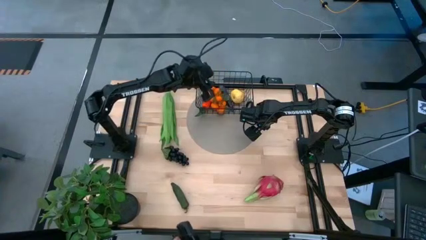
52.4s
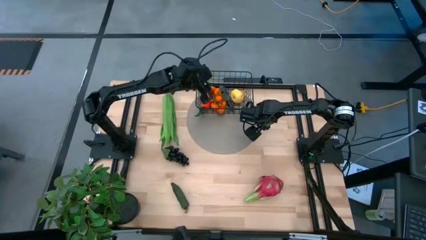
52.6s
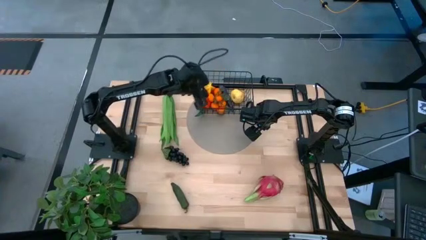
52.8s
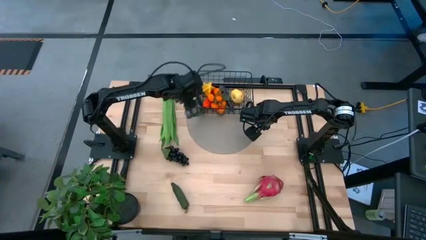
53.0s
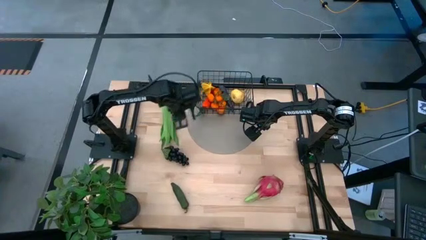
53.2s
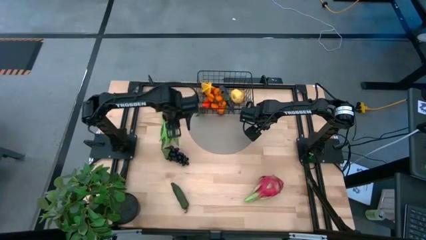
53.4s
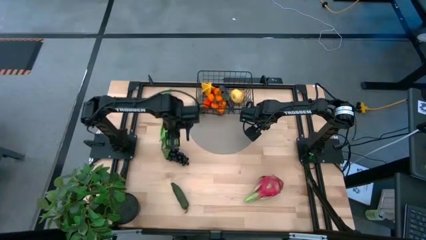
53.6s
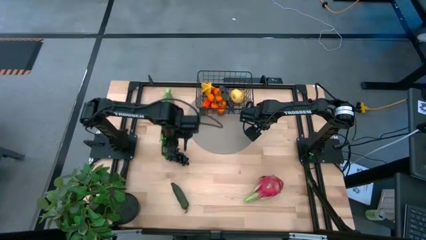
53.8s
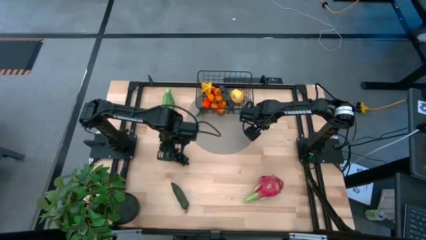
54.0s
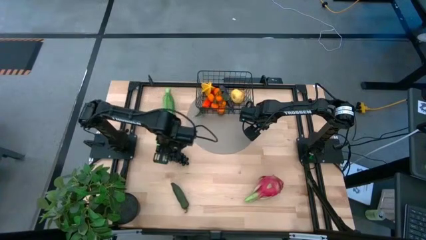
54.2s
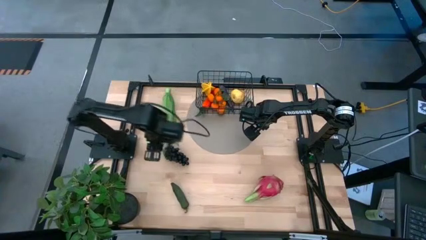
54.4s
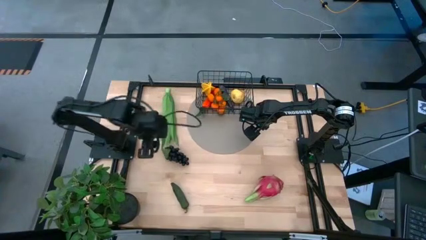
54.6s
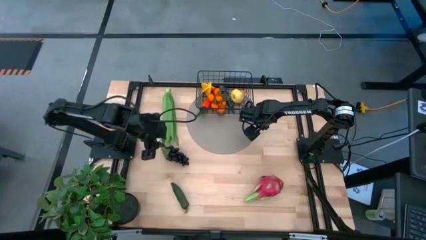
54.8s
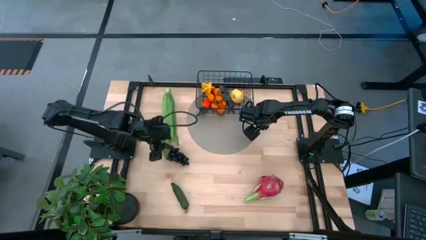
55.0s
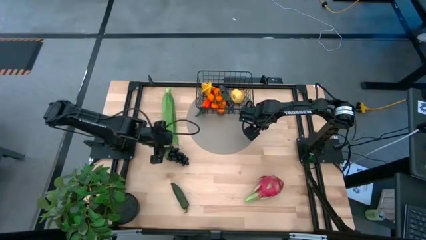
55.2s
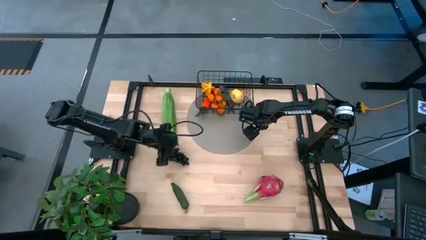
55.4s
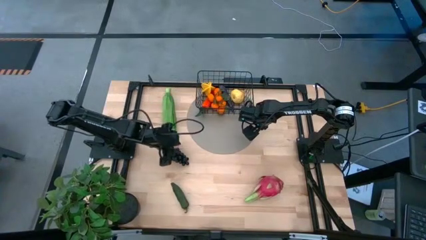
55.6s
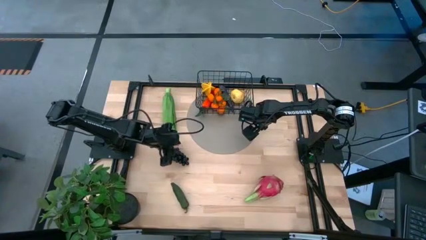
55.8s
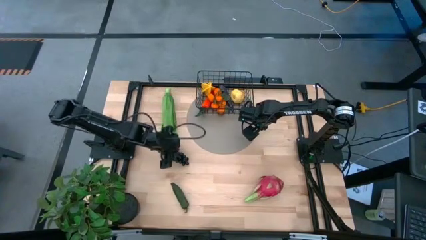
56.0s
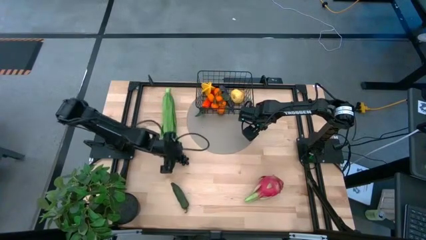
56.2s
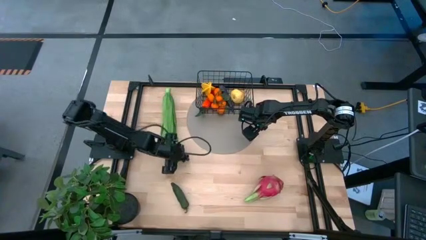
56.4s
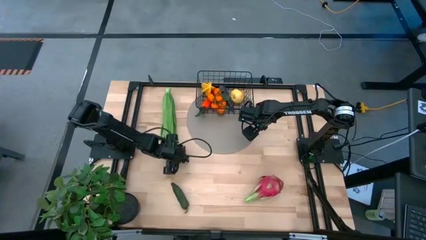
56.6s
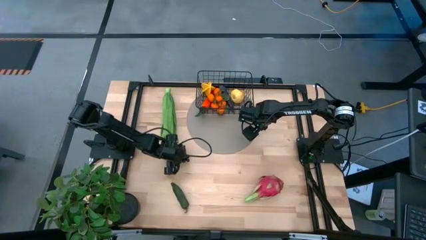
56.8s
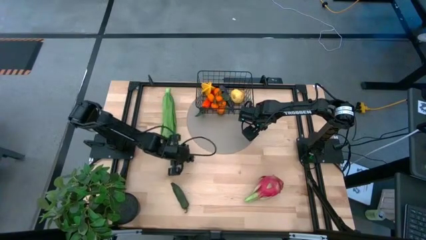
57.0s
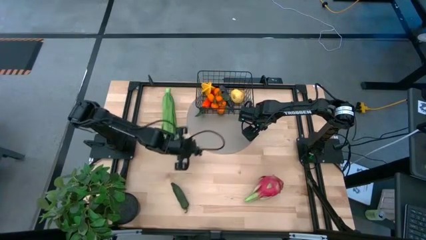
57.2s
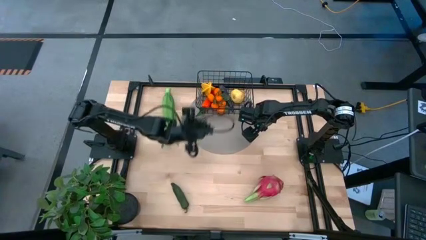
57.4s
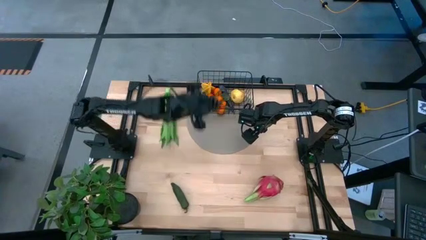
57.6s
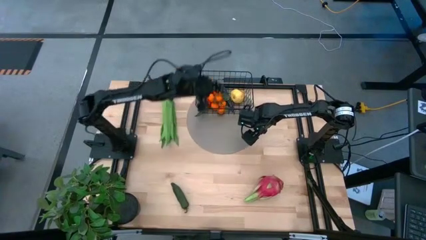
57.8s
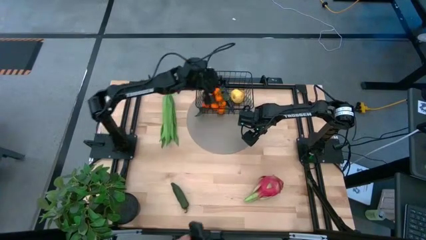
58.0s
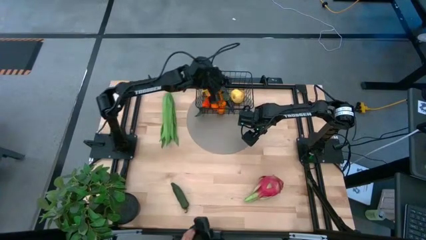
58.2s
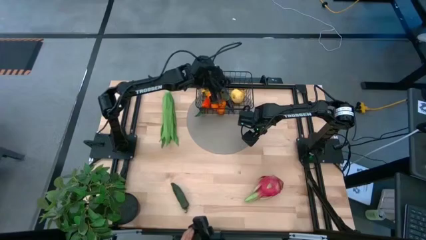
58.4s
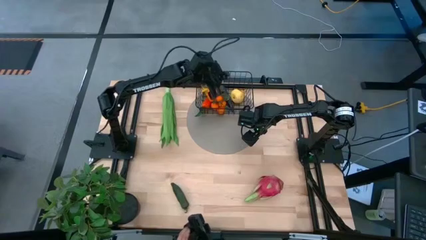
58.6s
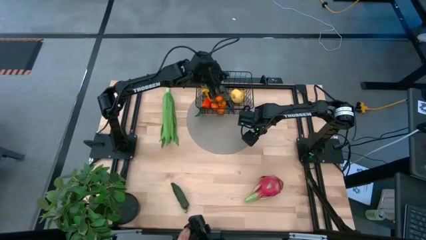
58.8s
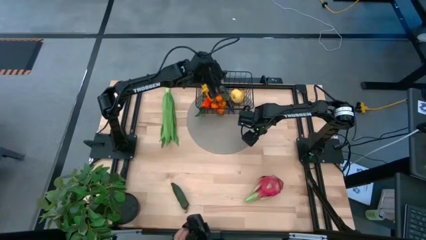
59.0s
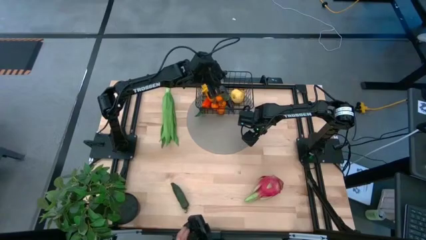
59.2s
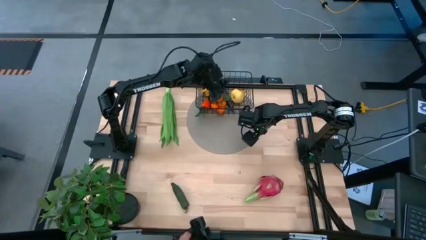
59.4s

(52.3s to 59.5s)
Task: Build produce basket
Put the black grapes into the black wire basket

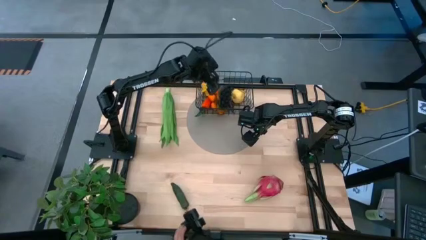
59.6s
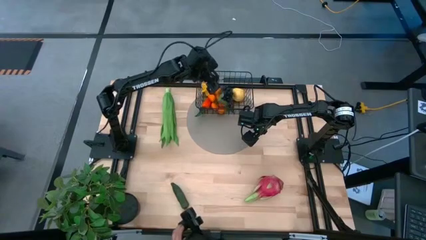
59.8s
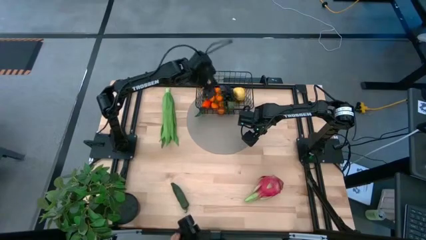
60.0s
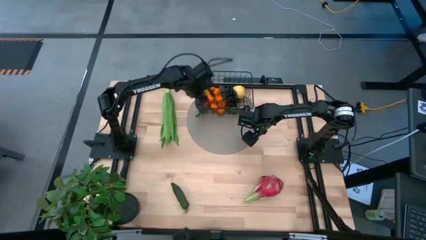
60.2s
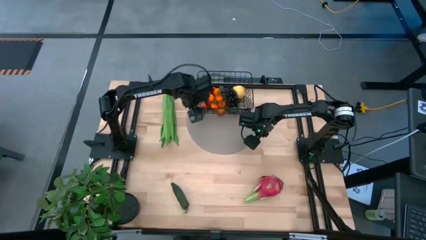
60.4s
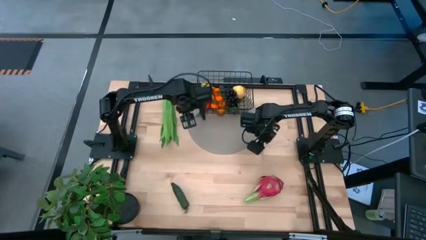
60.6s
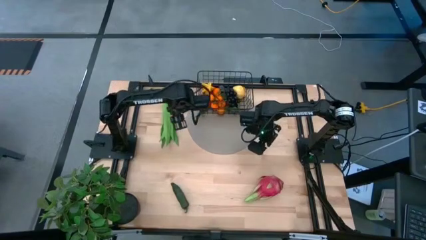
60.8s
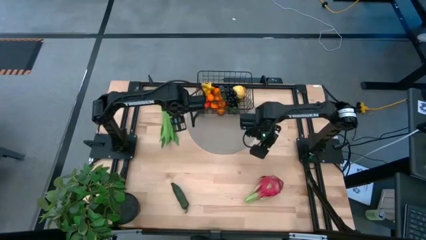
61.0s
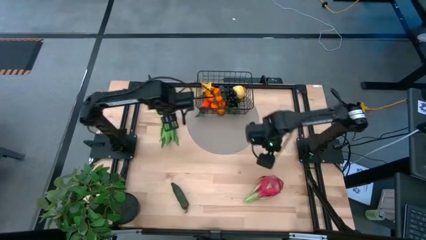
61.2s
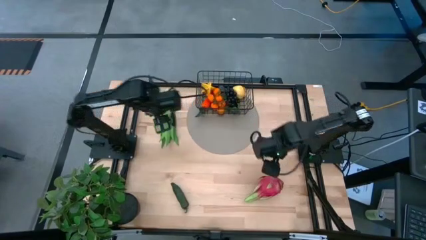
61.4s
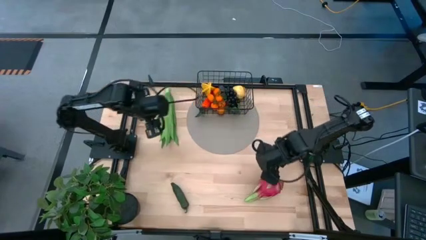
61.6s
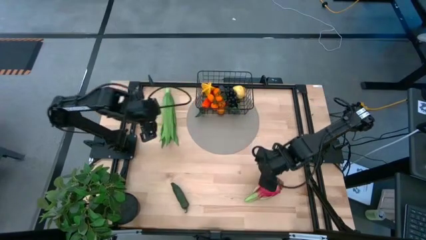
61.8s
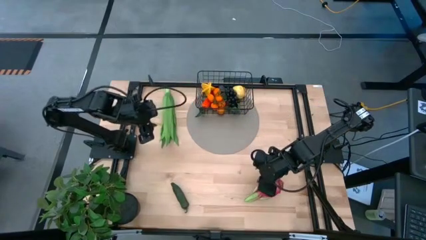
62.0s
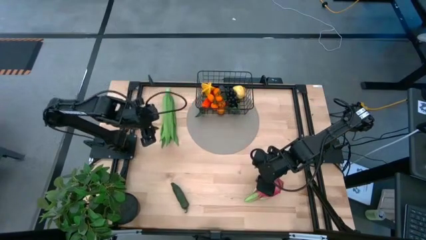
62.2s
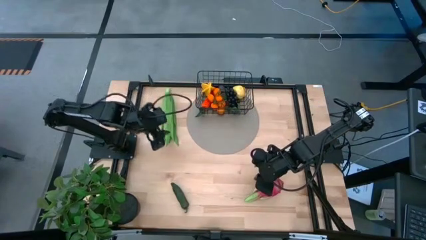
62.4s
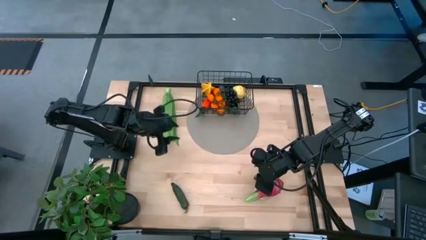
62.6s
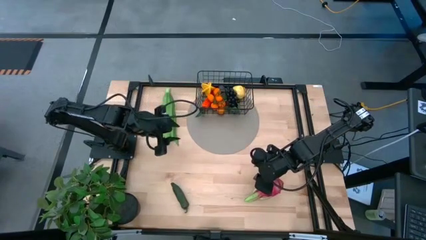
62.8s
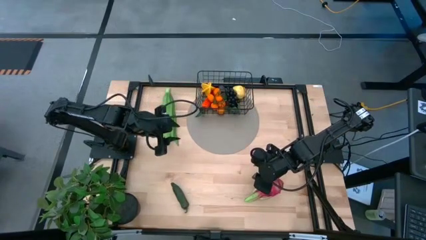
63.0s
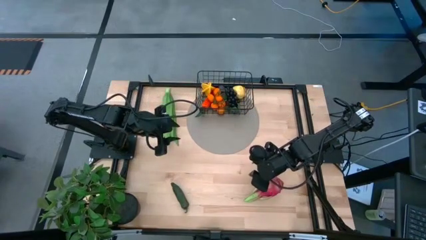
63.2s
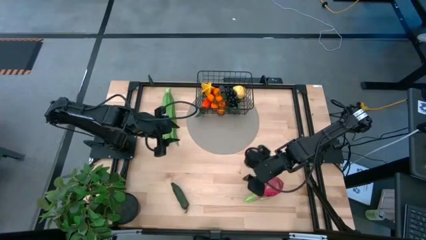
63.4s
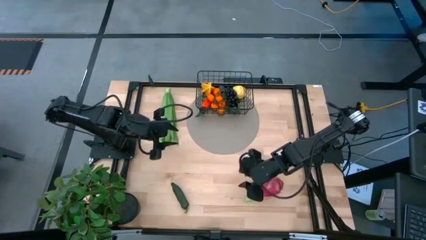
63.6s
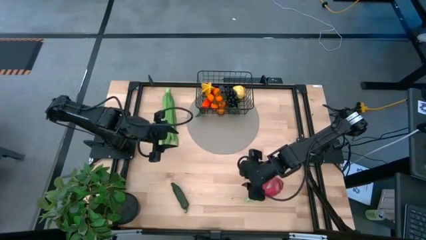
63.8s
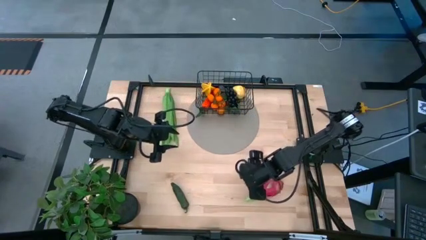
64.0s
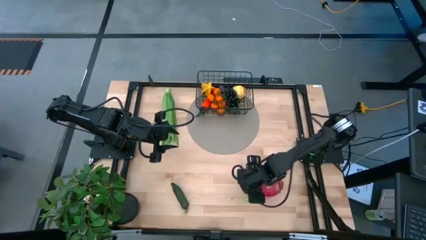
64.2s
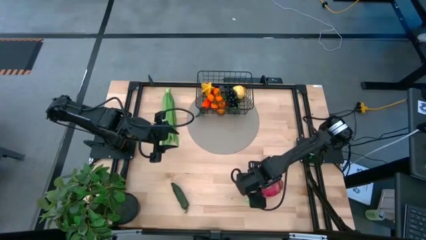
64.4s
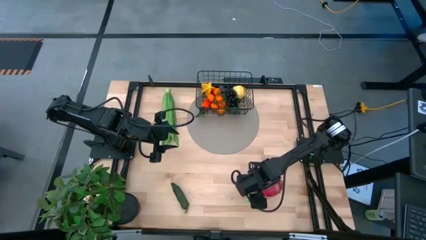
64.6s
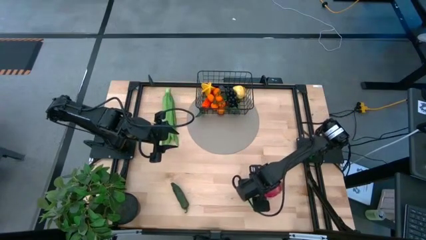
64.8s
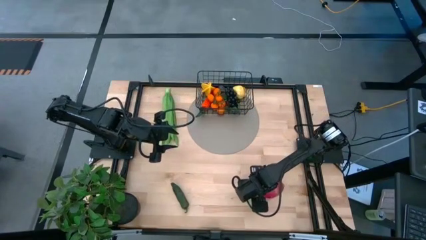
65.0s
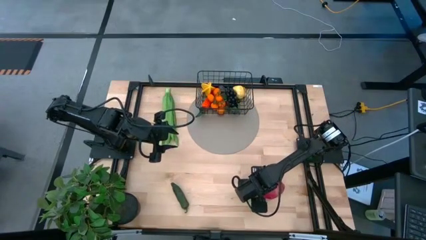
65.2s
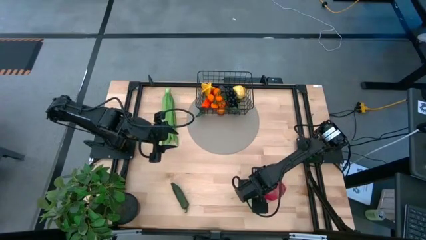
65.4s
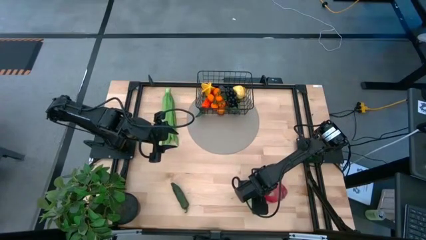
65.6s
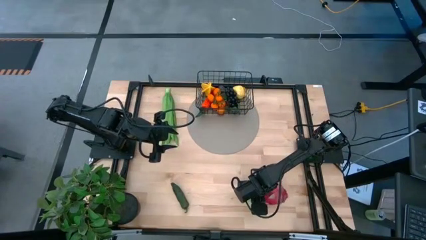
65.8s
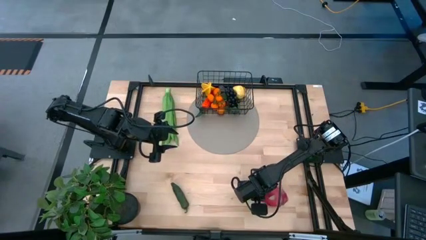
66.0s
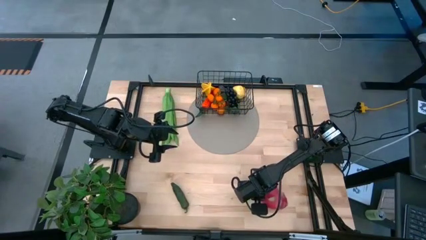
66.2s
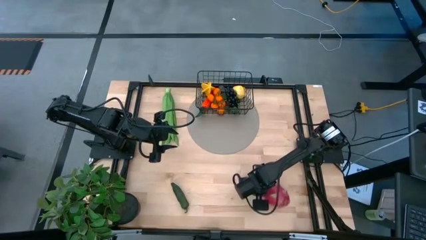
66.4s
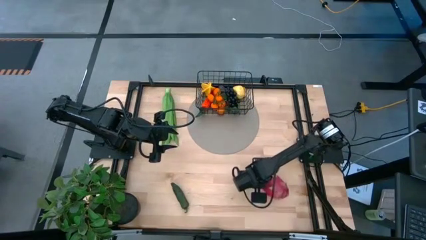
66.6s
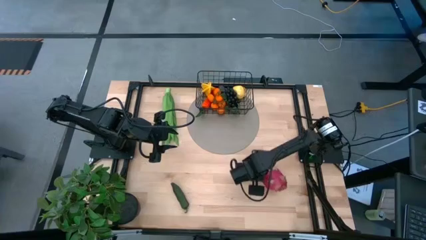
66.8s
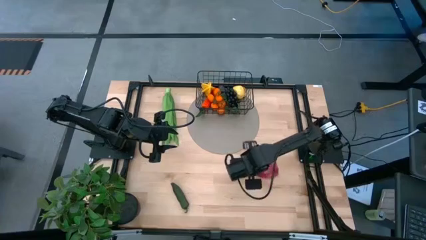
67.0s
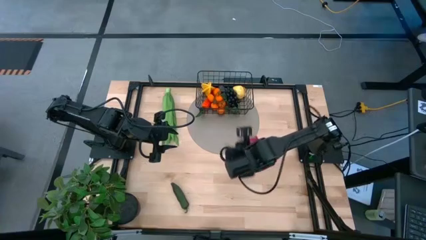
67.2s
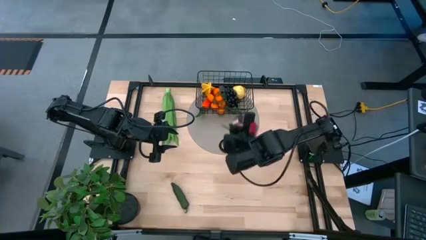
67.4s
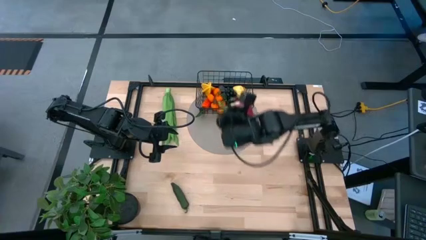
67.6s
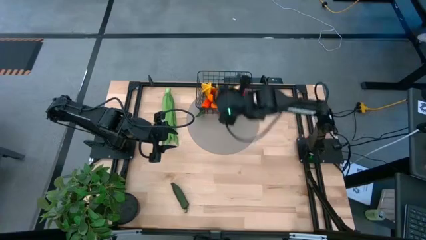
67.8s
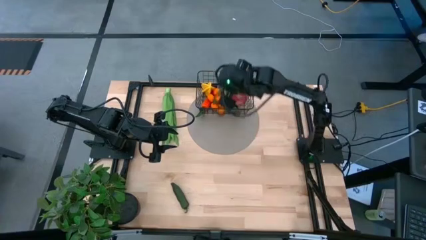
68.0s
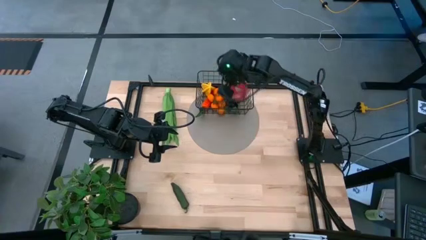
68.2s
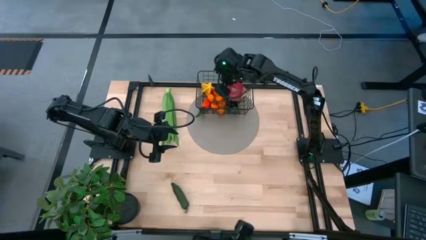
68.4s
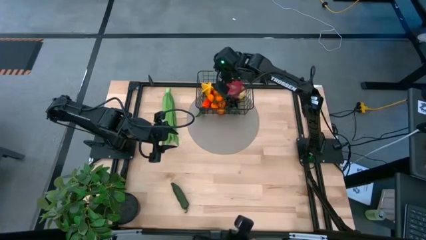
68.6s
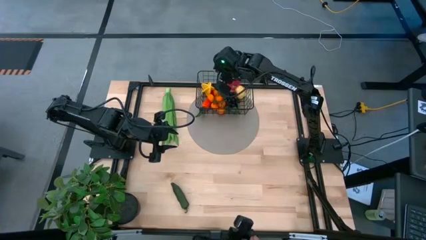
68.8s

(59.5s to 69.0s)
Put the pink dragon fruit into the black wire basket
